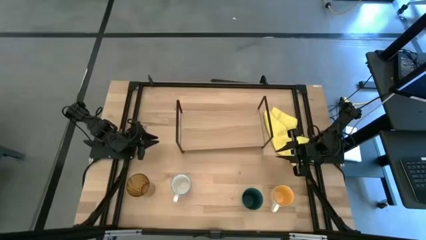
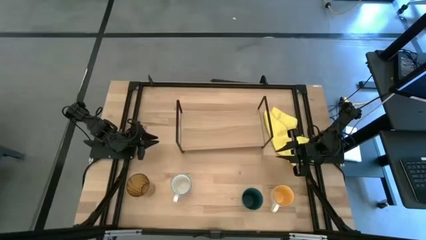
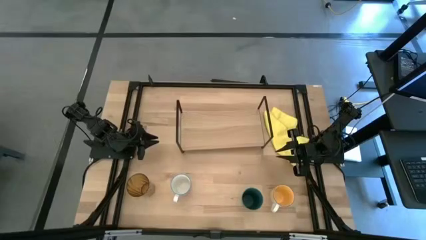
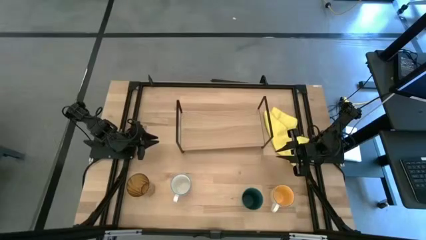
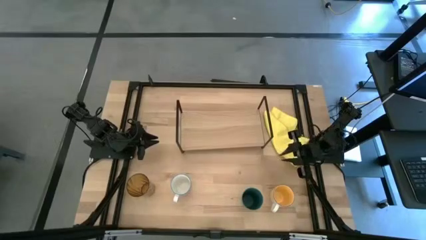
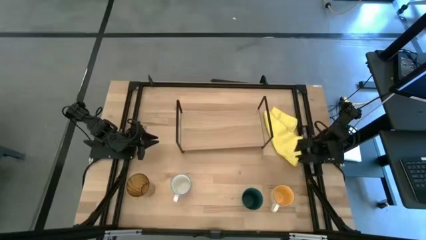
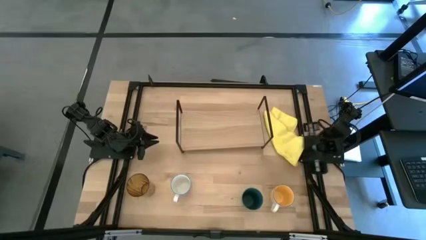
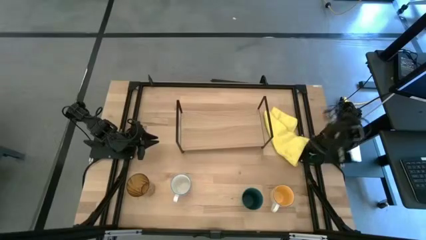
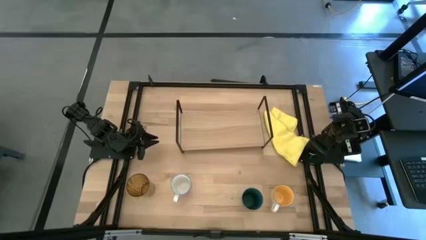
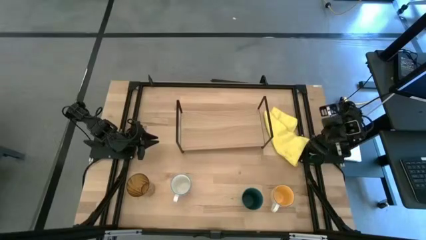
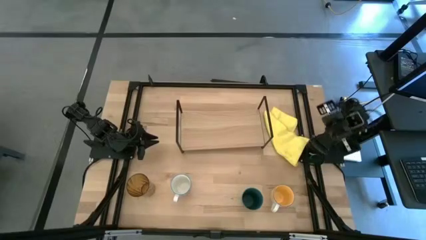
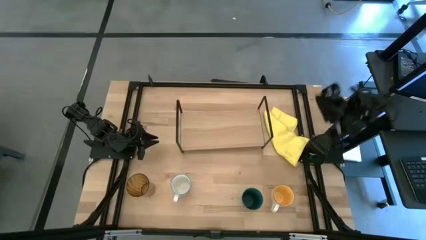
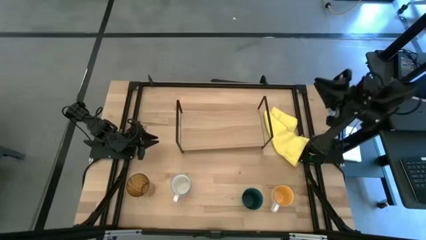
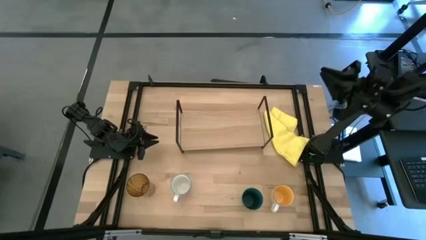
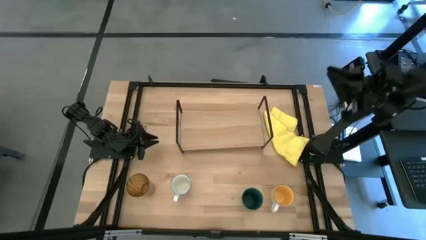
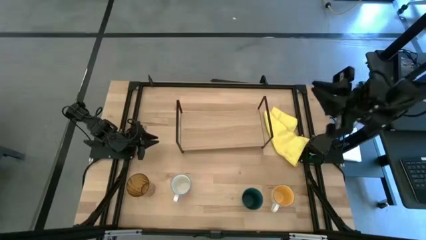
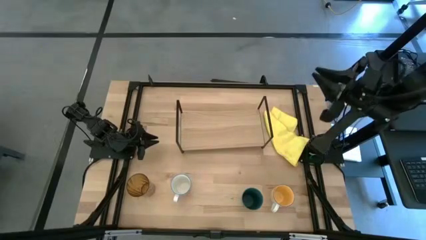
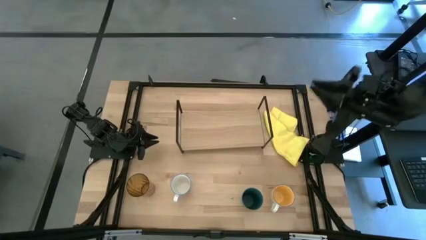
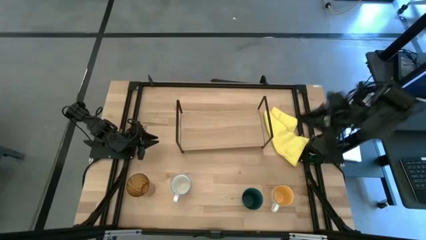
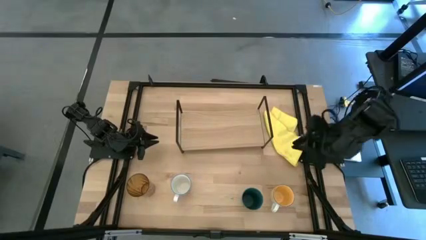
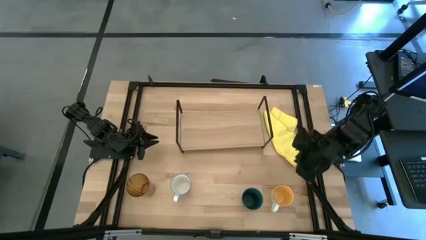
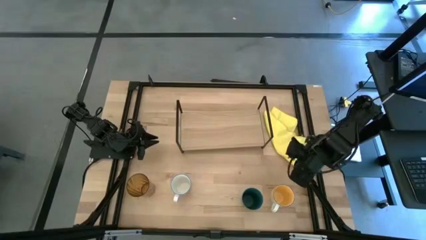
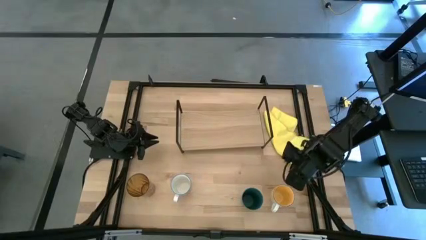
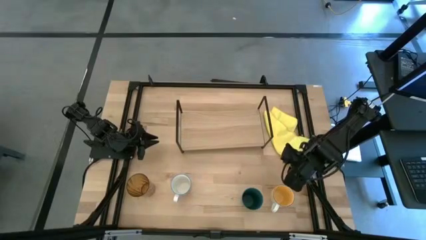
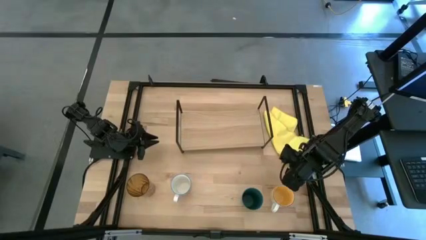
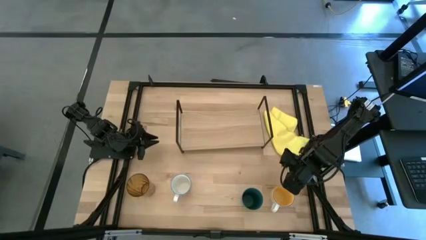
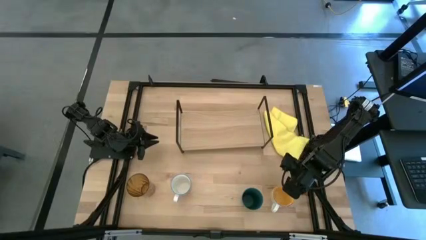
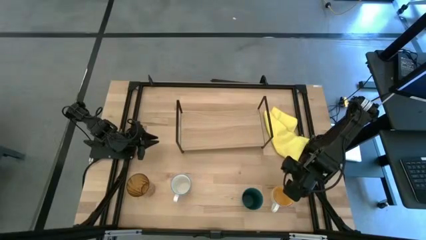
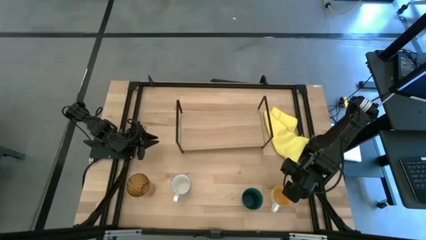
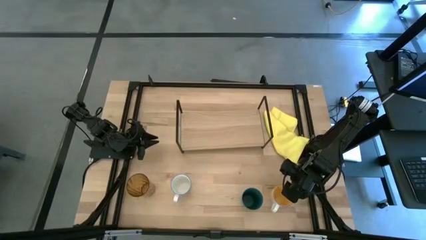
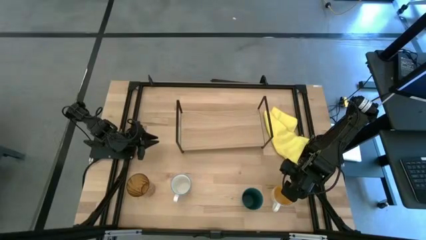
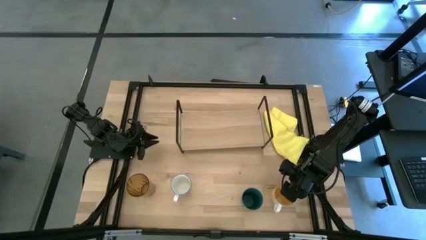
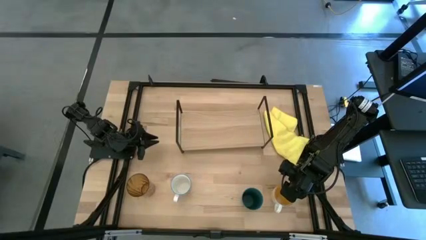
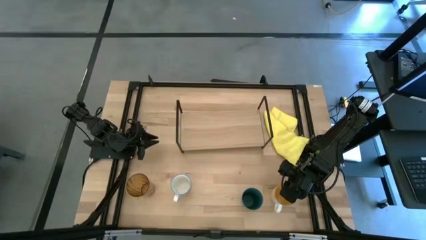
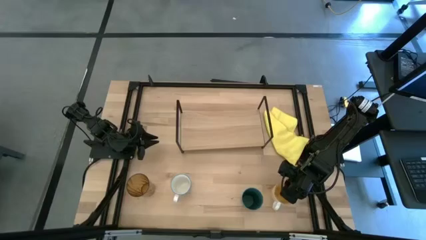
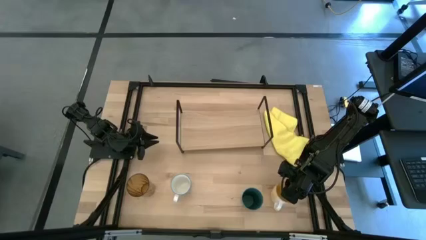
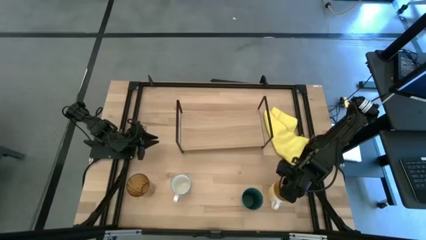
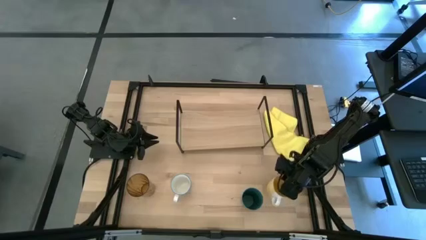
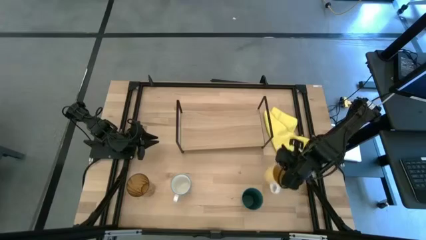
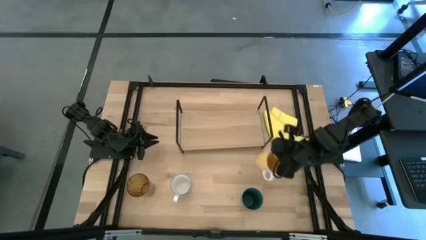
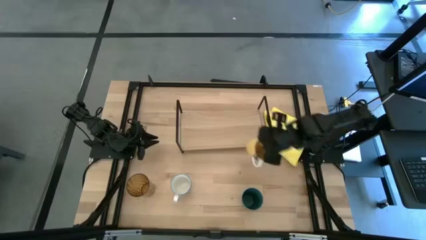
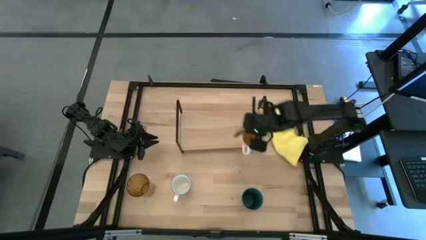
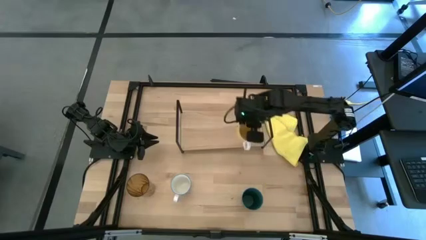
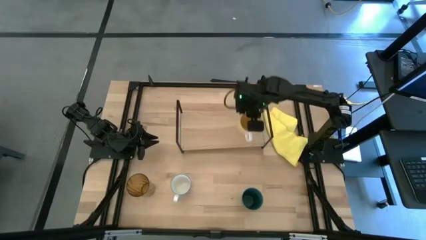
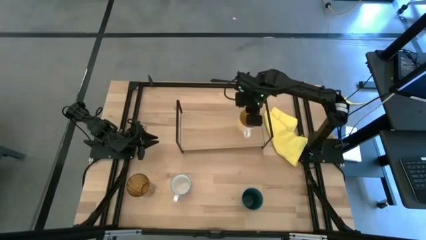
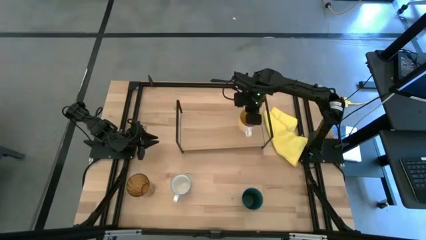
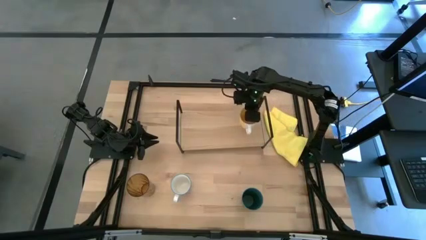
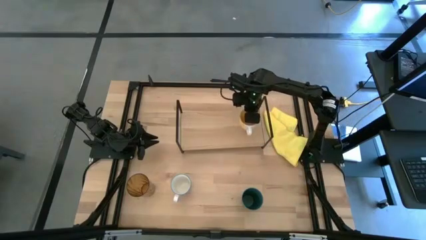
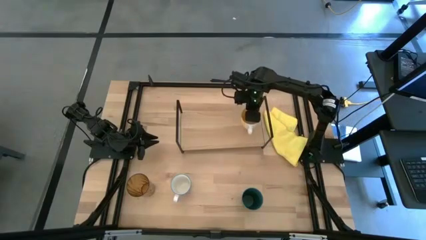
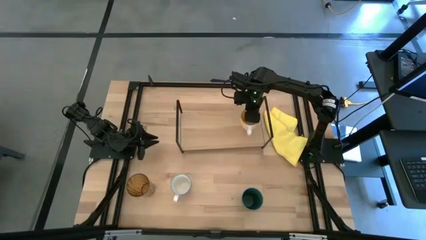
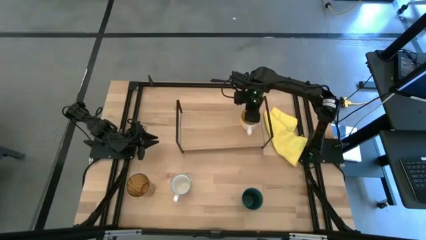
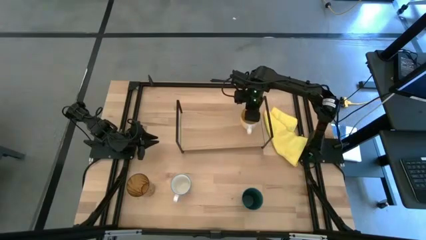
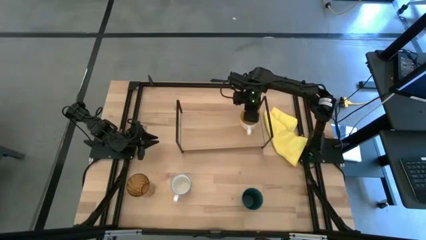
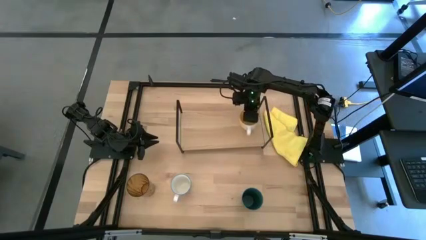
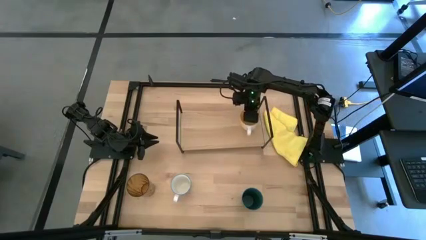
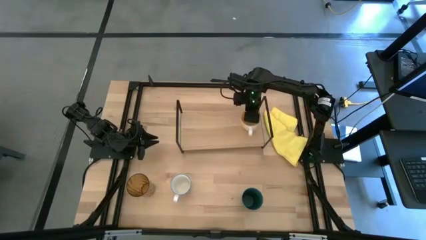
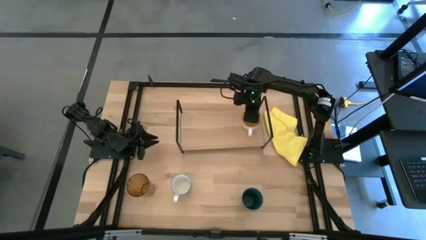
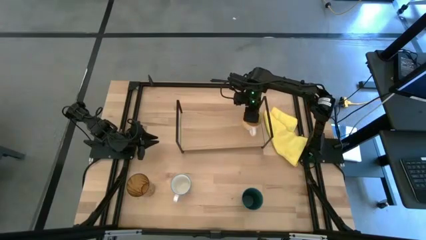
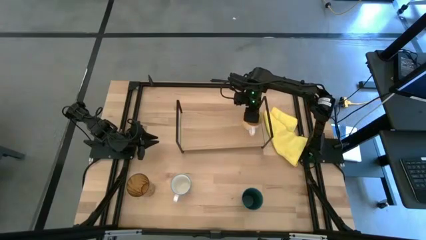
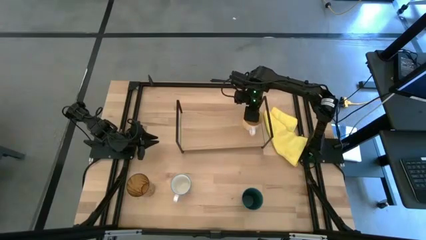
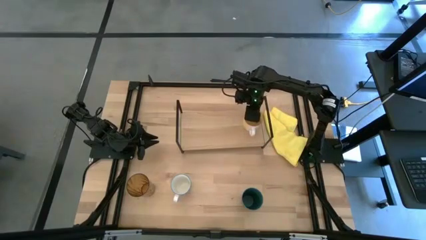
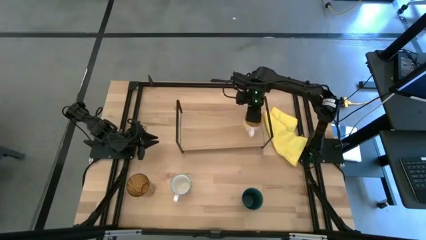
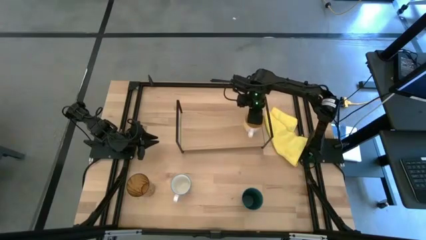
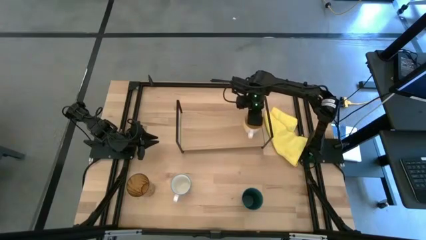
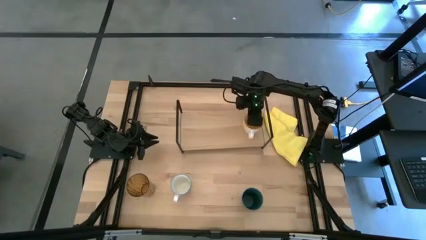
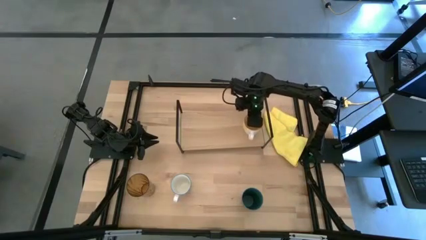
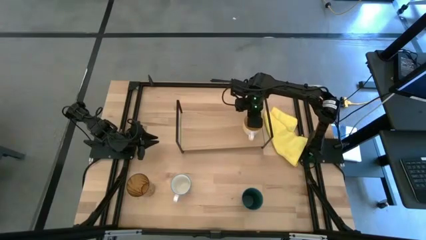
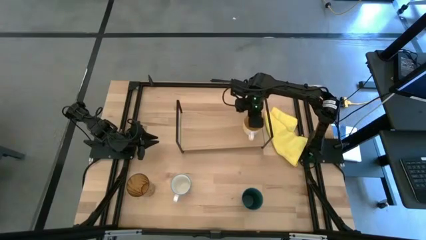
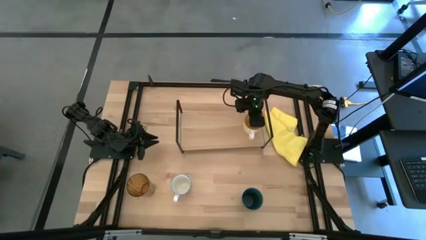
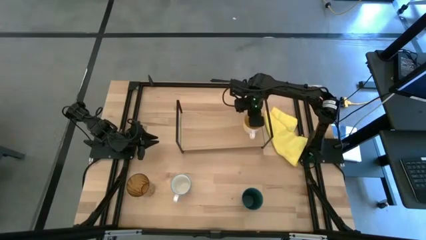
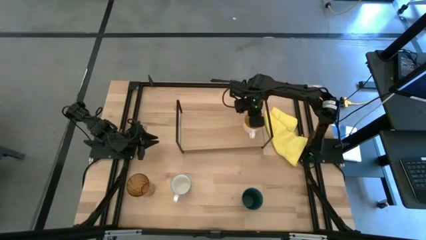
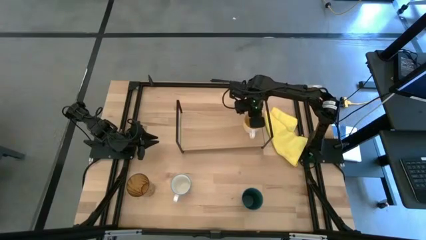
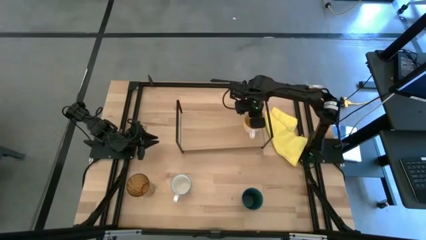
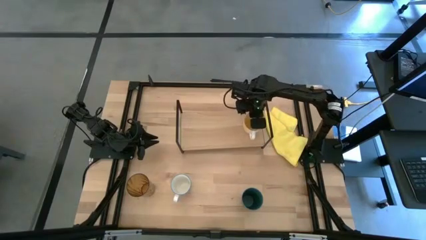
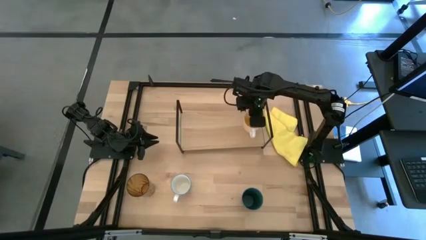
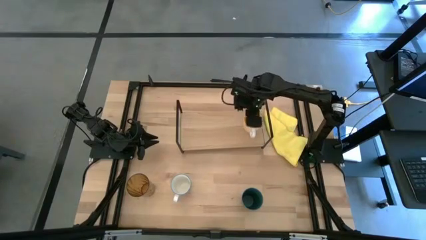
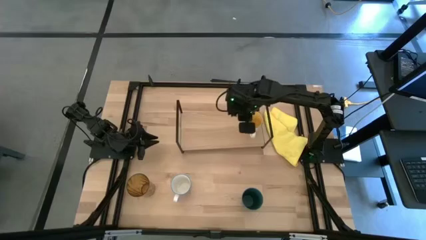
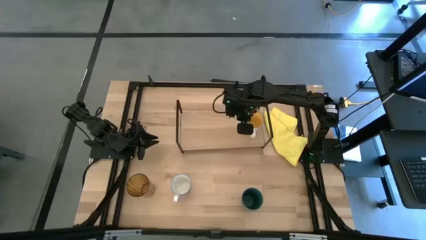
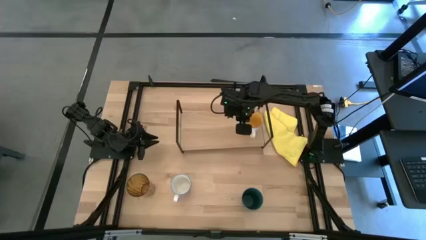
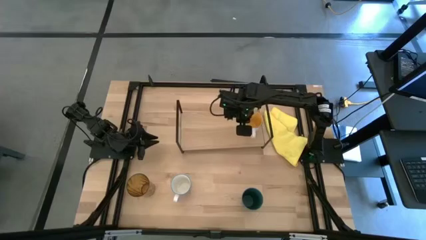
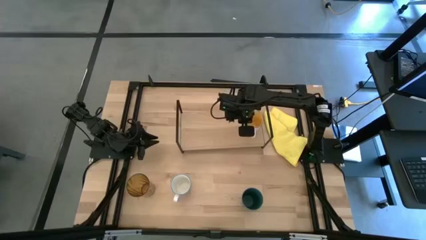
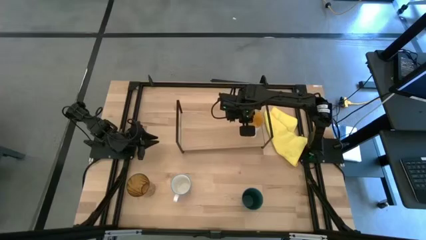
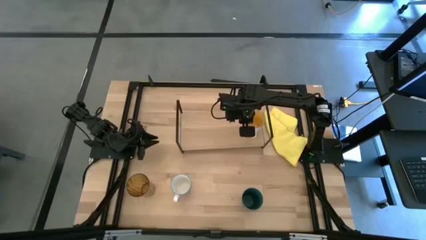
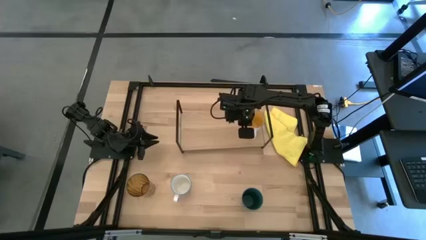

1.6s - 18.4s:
Task: Stack small to large cups/mugs on shelf
Put the yellow cup on the shelf
